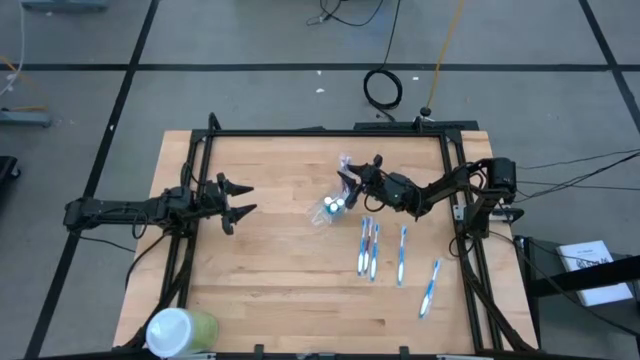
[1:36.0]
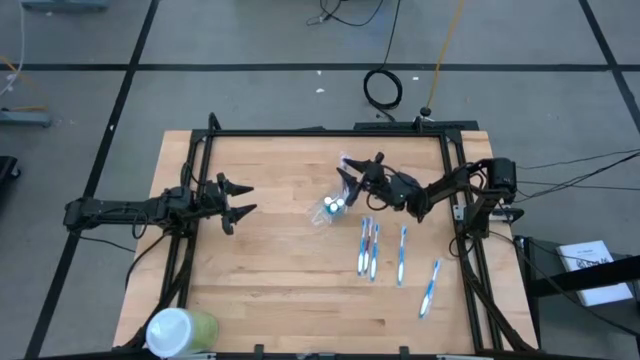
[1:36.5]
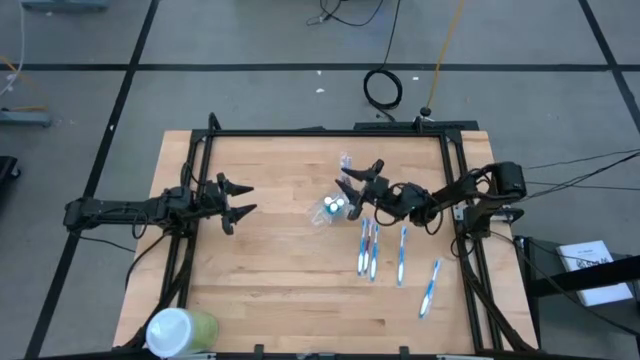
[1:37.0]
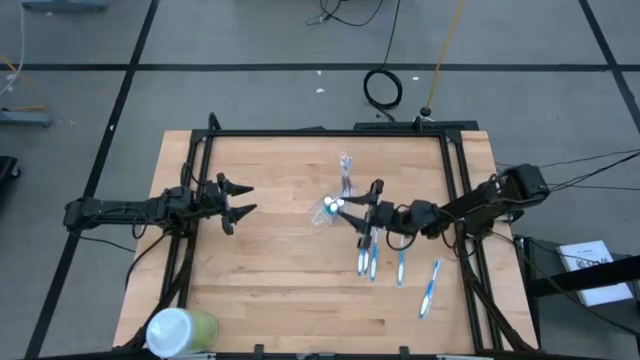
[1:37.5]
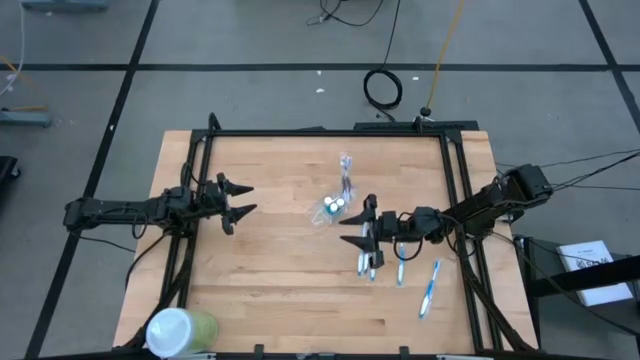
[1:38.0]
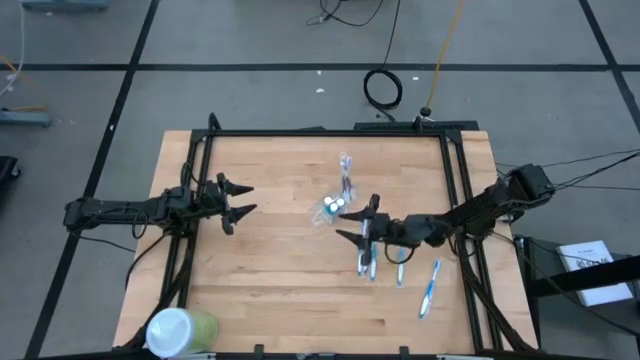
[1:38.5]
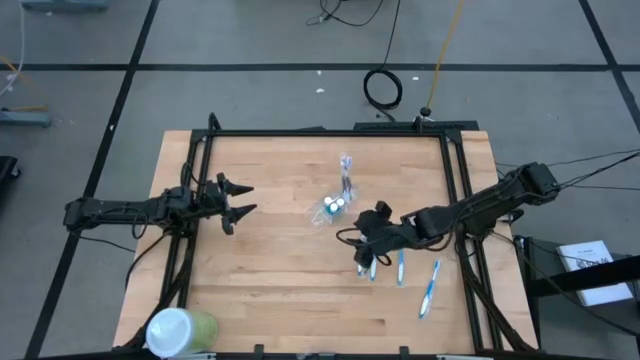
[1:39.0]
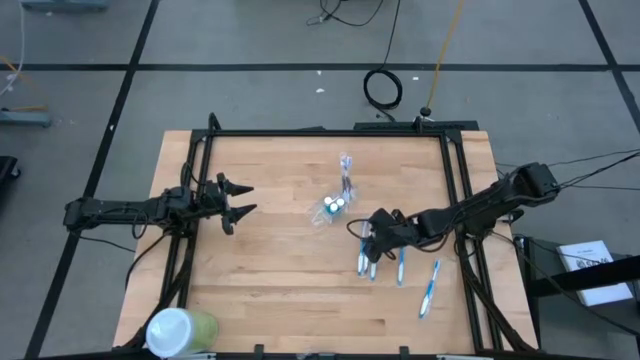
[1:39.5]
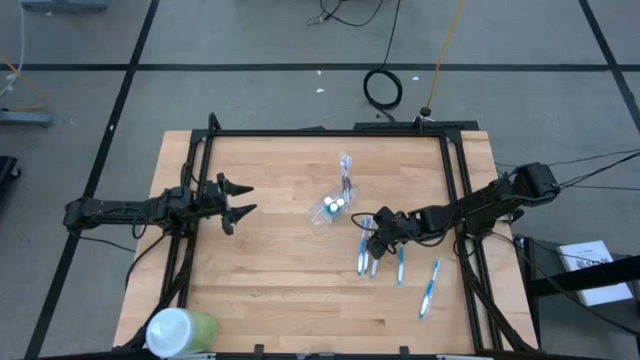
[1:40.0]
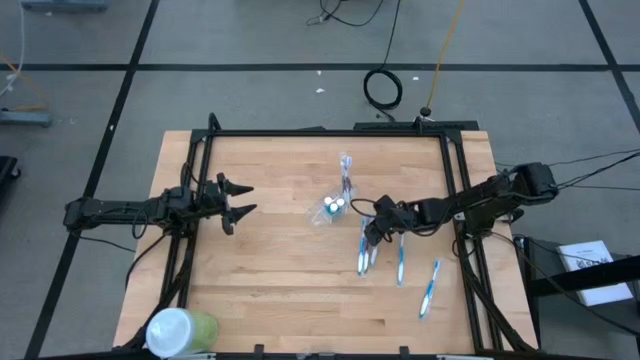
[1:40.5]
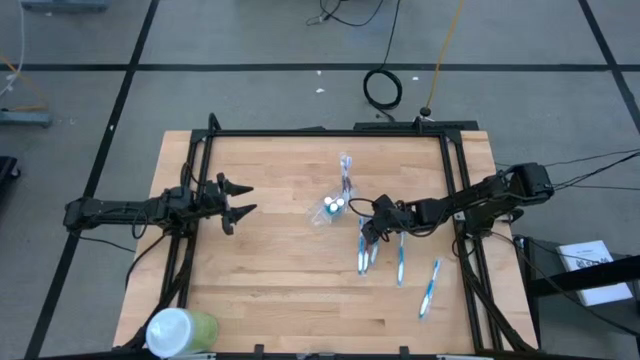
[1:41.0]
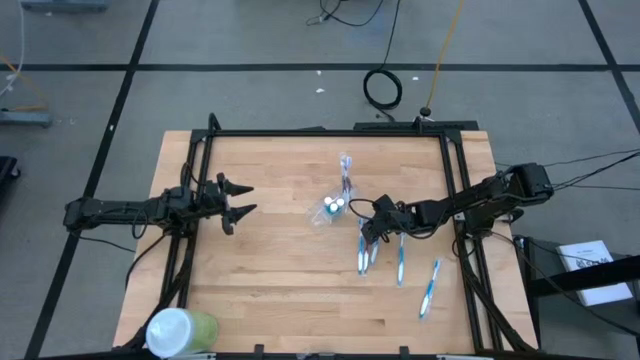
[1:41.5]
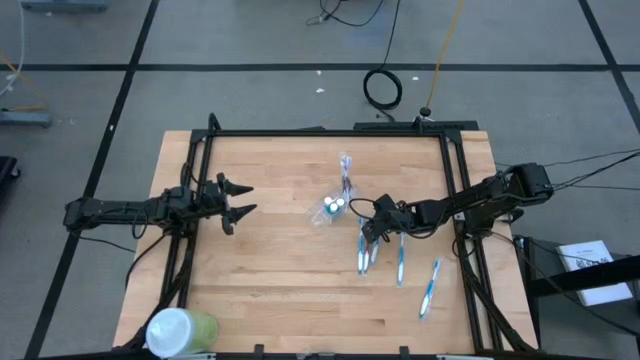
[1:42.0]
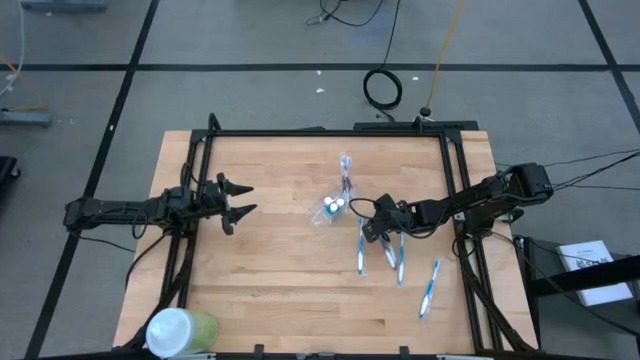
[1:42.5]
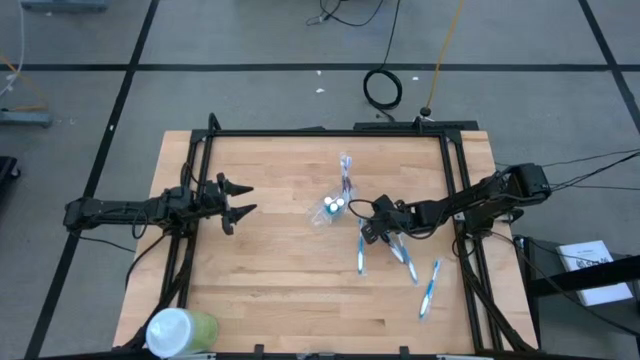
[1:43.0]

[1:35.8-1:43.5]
Task: Pick & Place toothbrushing station
Put the purple toothbrush into the transparent organizer

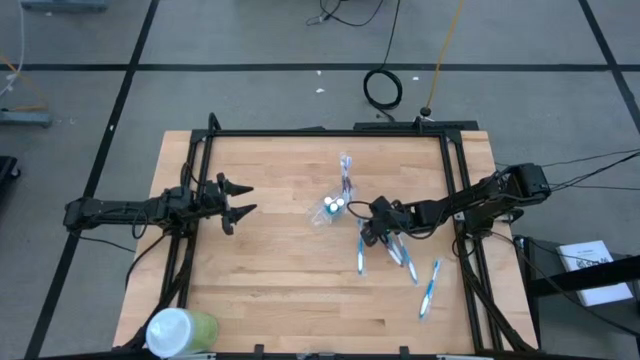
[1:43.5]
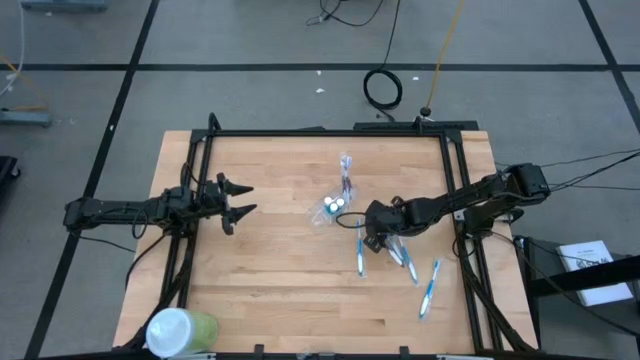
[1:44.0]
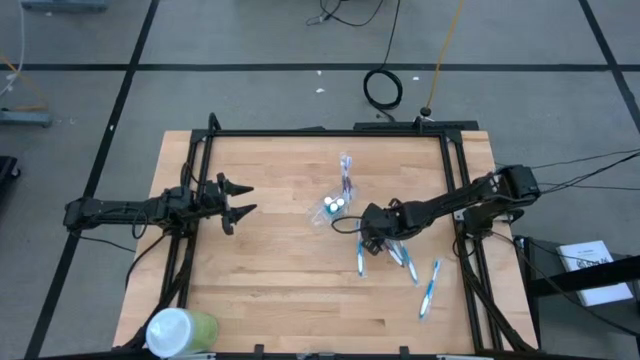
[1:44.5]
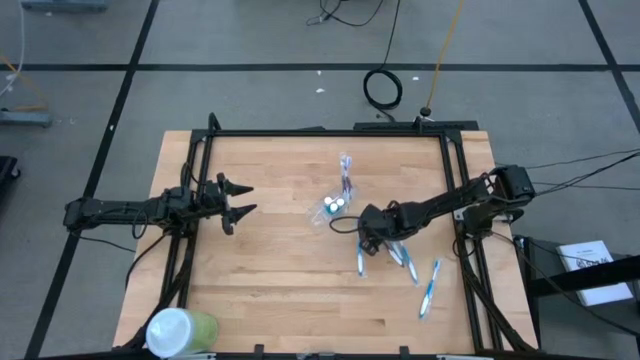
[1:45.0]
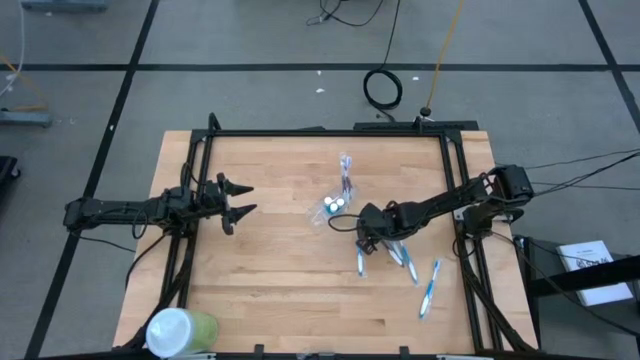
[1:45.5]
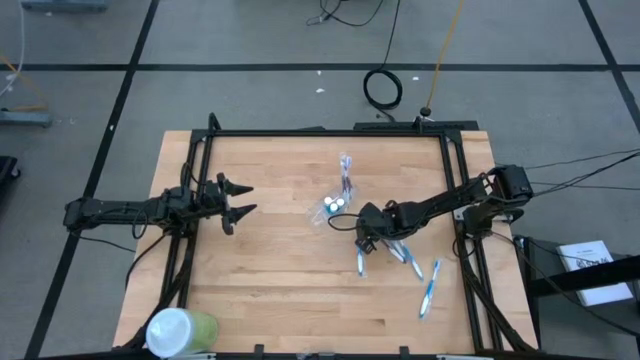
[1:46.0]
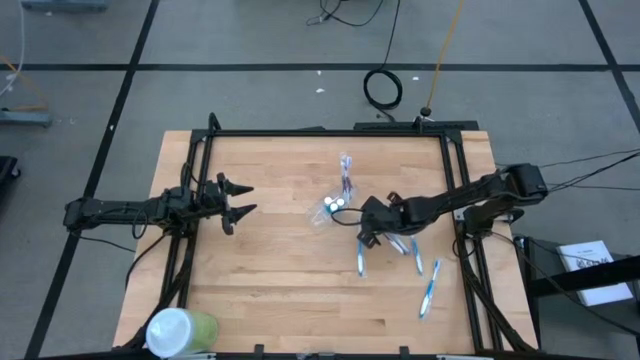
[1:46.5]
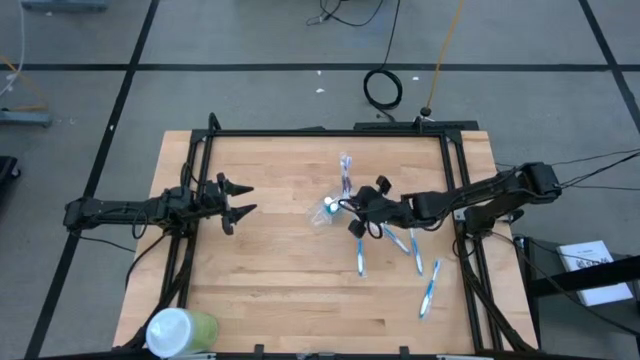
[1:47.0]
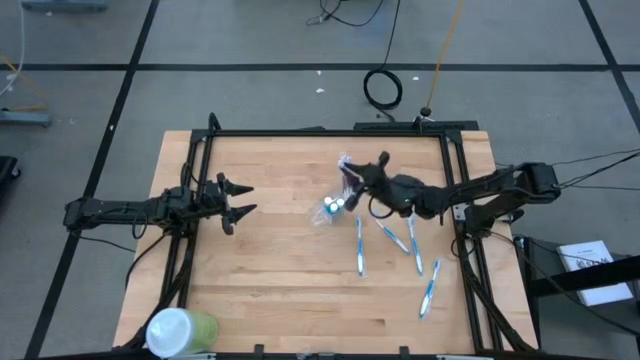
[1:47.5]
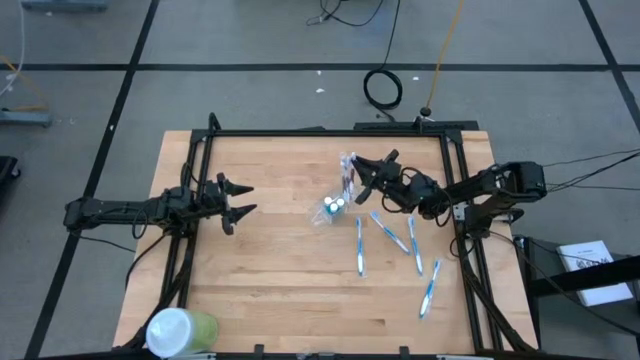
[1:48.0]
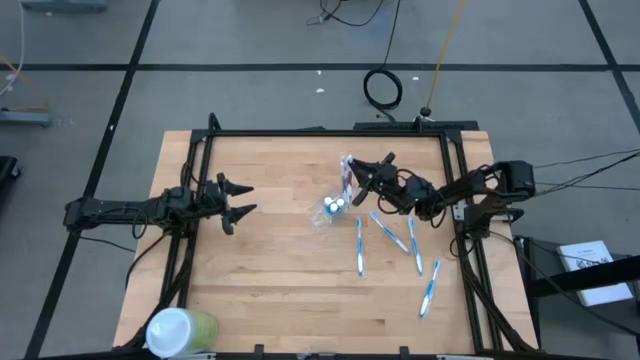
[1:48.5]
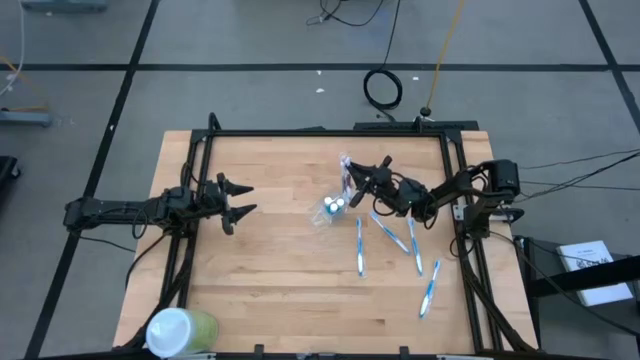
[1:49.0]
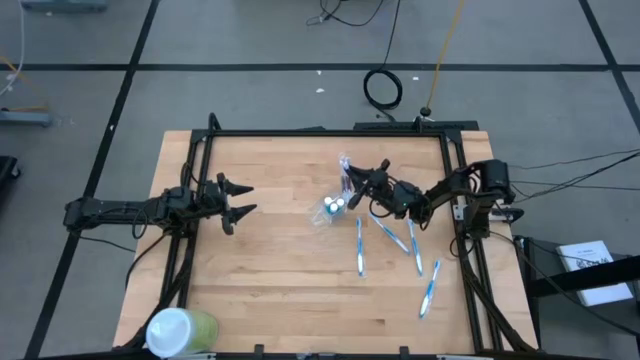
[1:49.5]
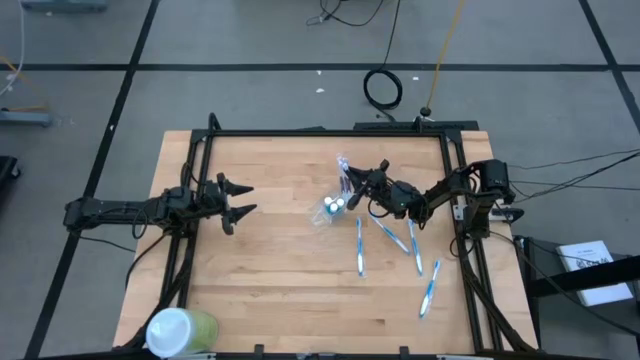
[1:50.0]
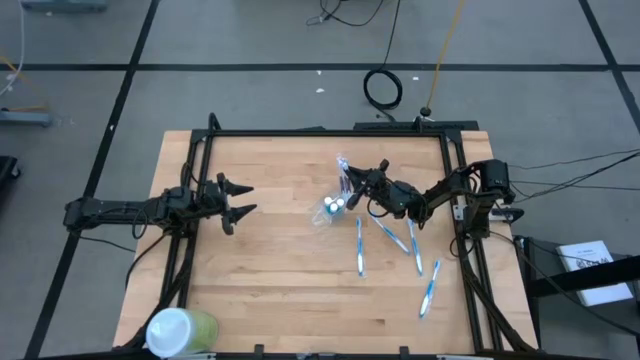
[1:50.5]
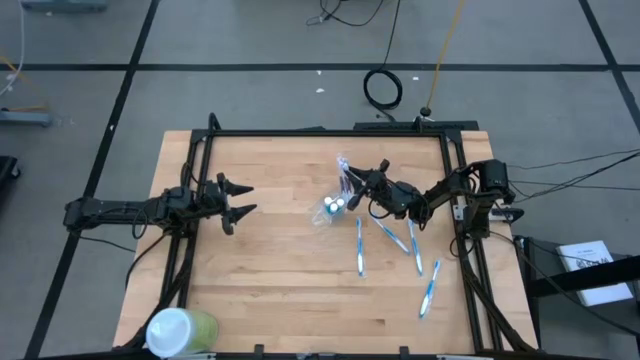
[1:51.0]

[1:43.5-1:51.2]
Put the purple toothbrush into the transparent organizer

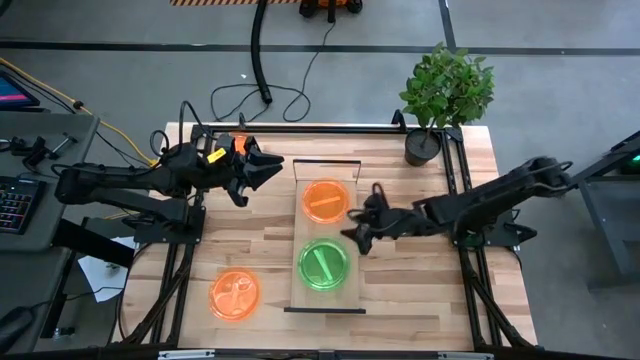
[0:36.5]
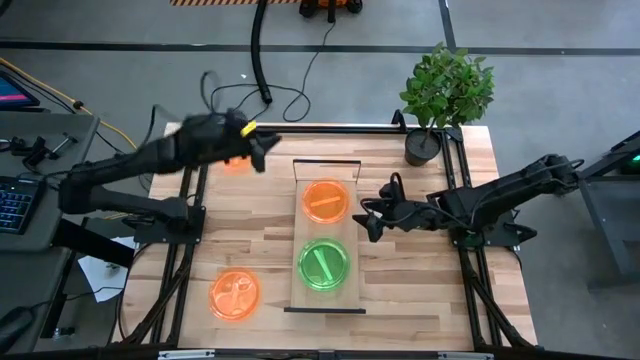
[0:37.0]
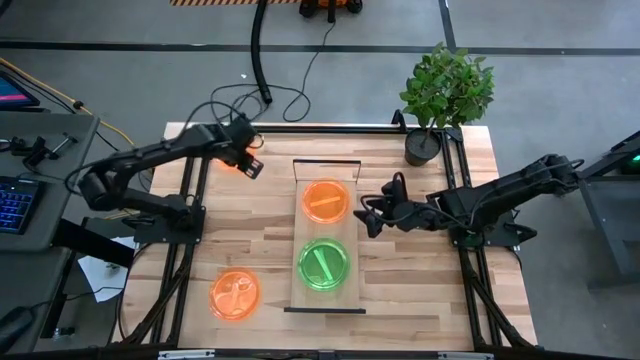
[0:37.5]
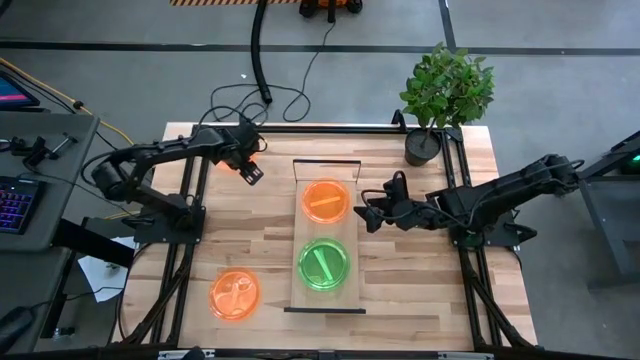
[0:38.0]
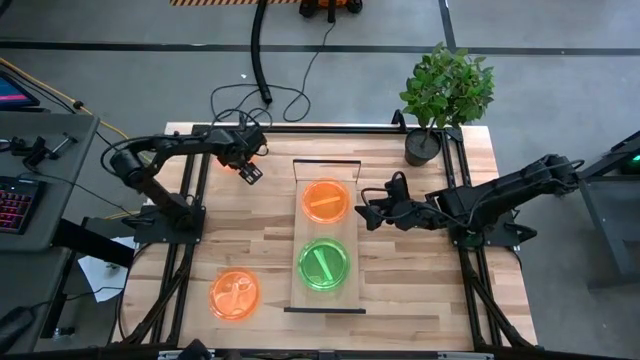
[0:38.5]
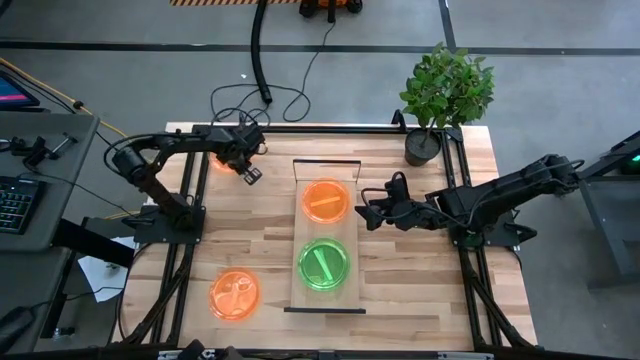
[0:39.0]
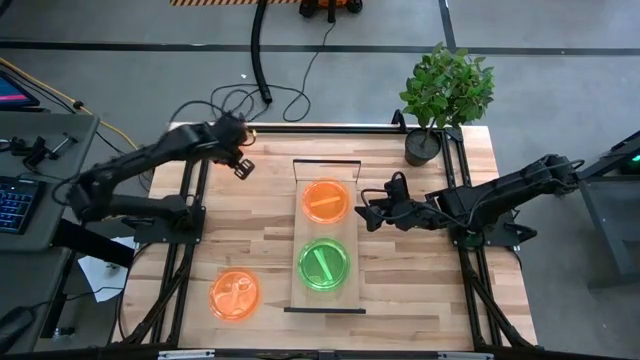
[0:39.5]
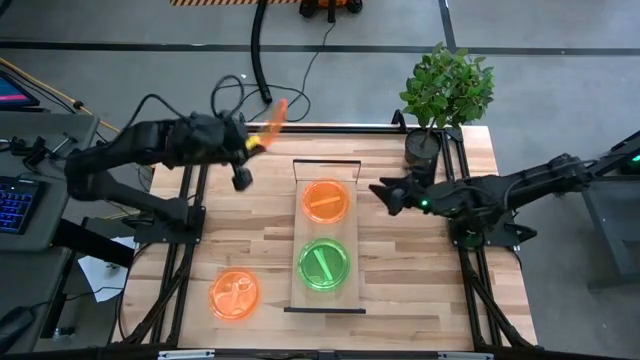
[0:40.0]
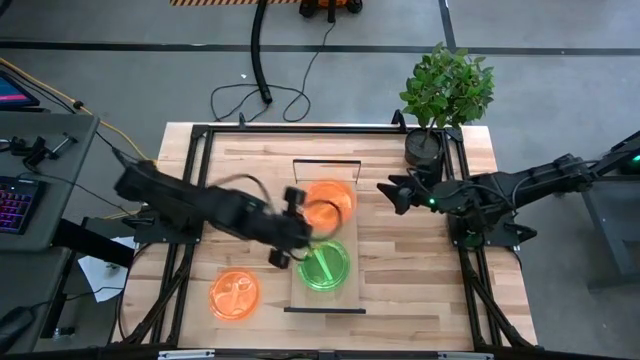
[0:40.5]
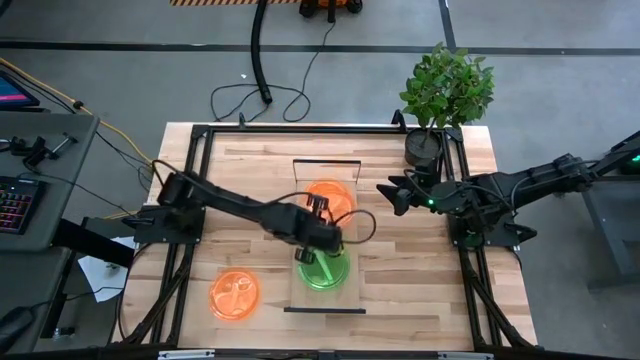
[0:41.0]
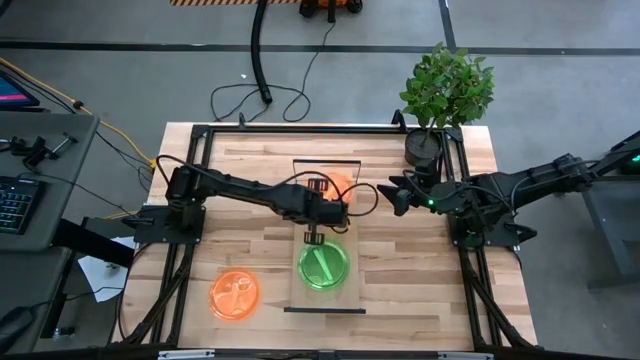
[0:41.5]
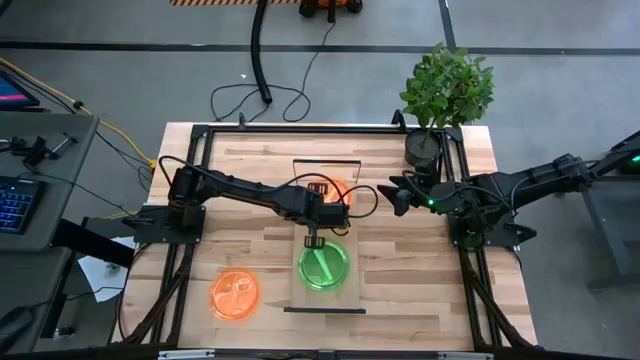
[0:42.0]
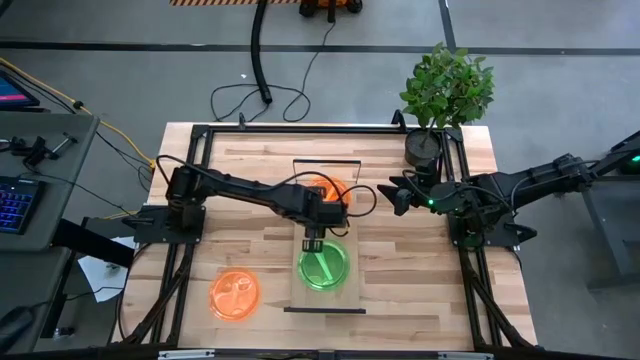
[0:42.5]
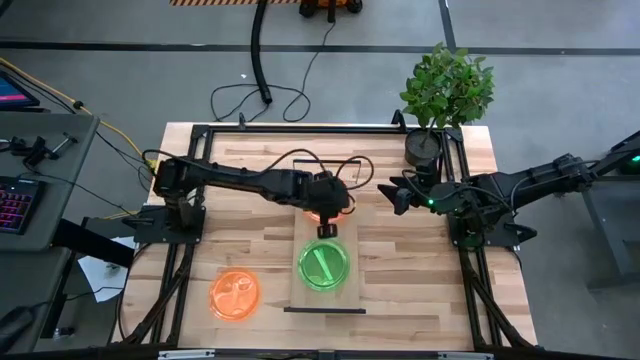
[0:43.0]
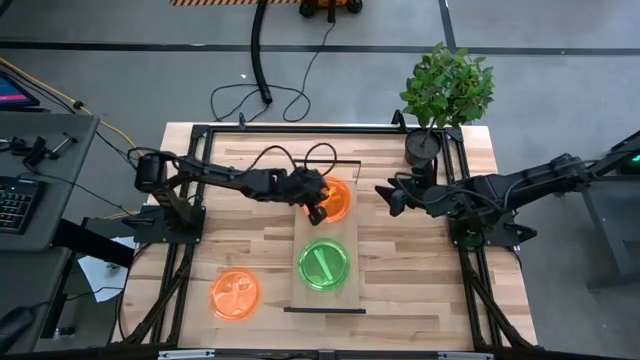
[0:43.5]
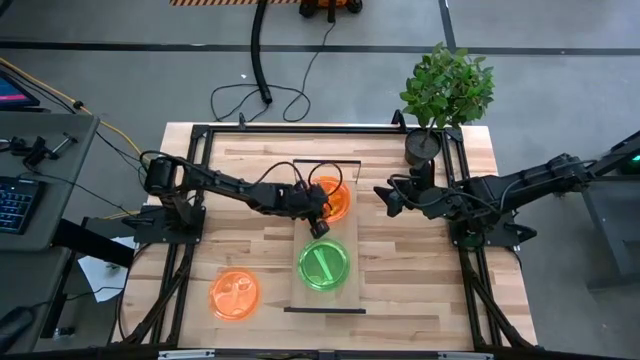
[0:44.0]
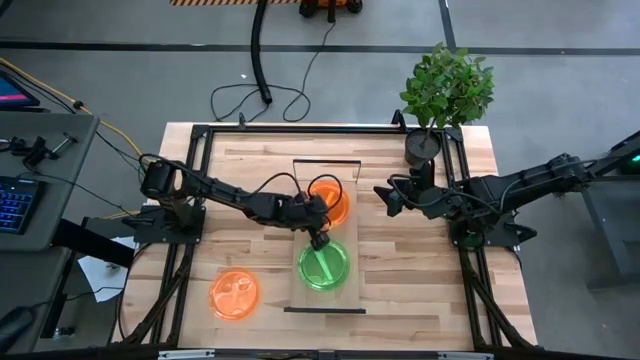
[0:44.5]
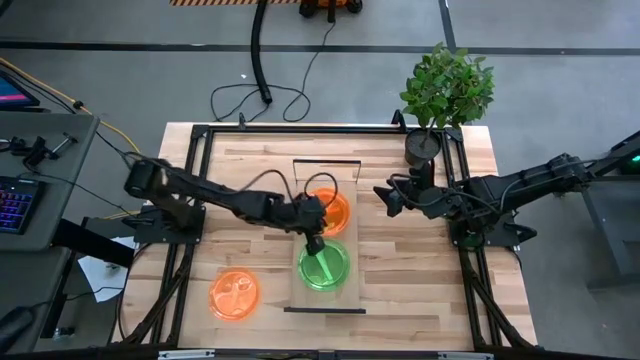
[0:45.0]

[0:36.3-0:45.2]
Task: Place and stack plates onto a shelf
Stack the top orange plate on top of the orange plate on the shelf
